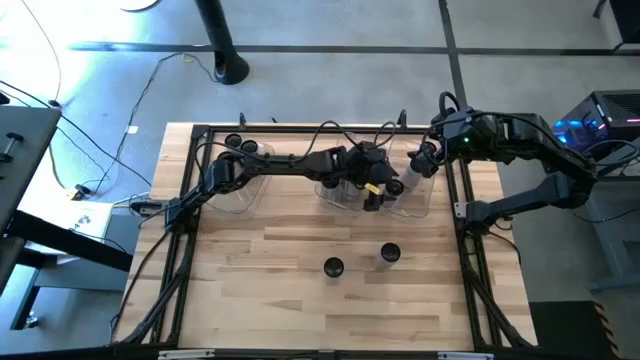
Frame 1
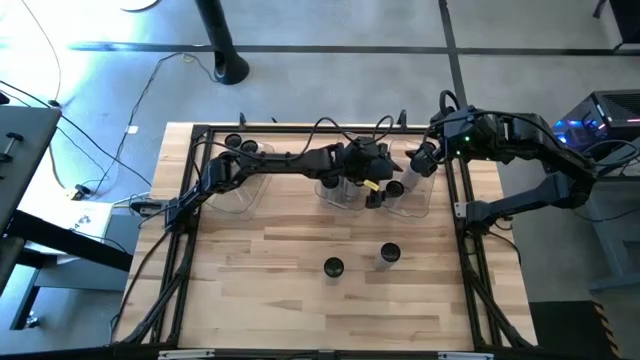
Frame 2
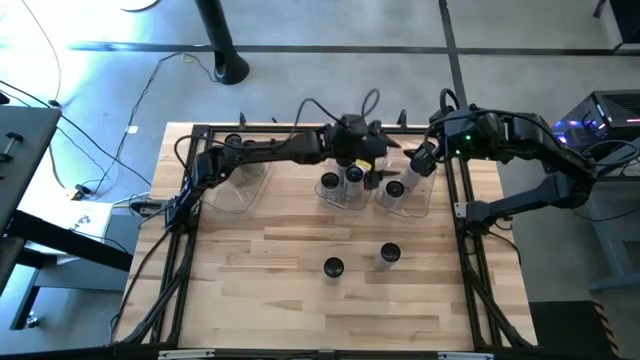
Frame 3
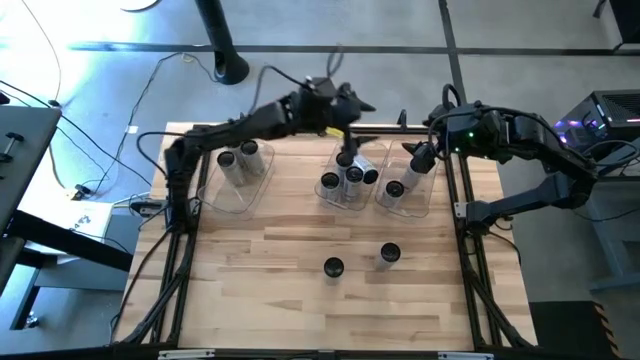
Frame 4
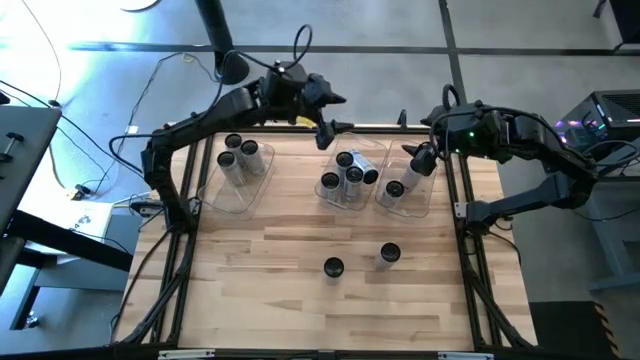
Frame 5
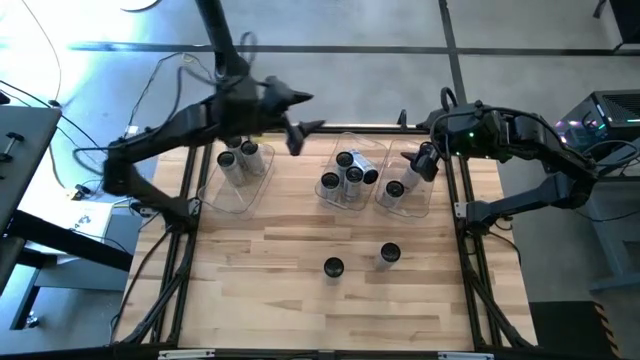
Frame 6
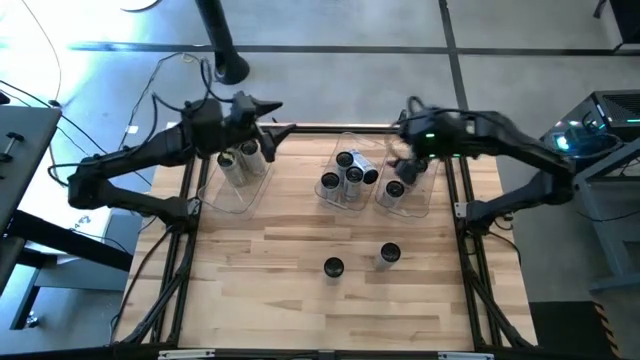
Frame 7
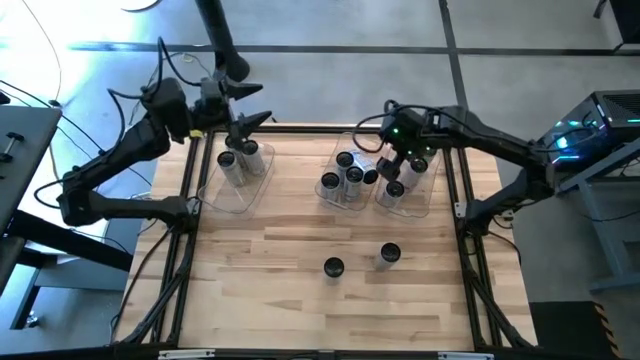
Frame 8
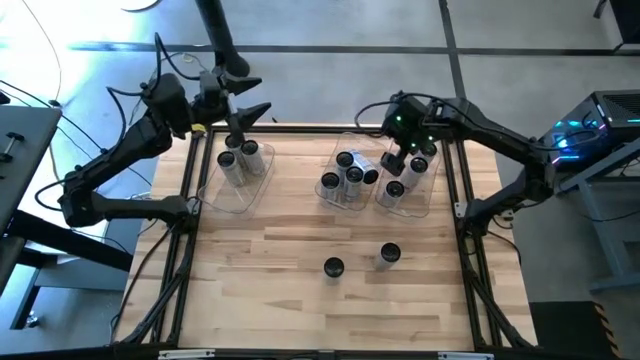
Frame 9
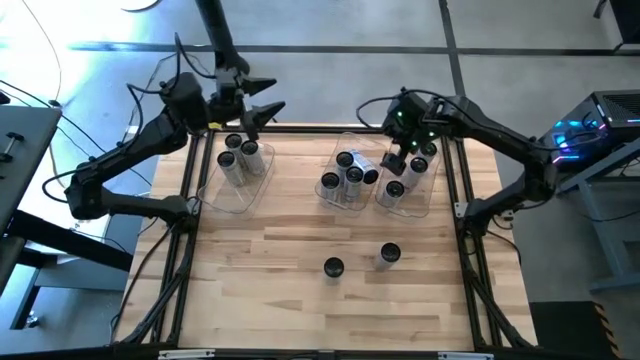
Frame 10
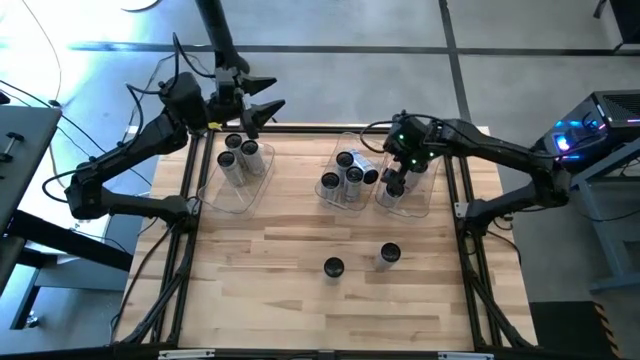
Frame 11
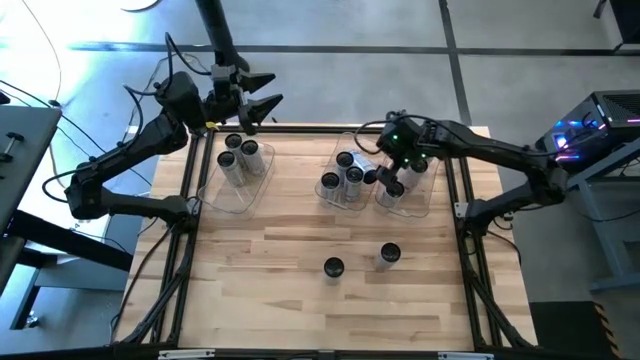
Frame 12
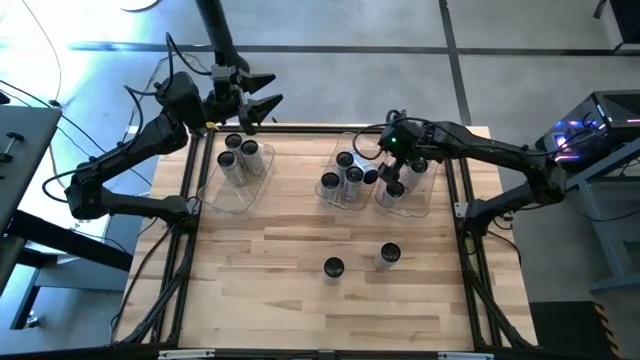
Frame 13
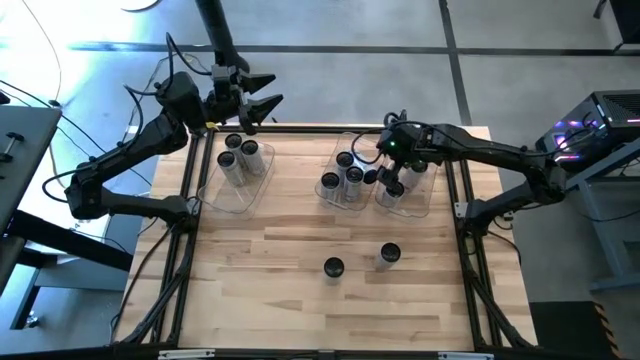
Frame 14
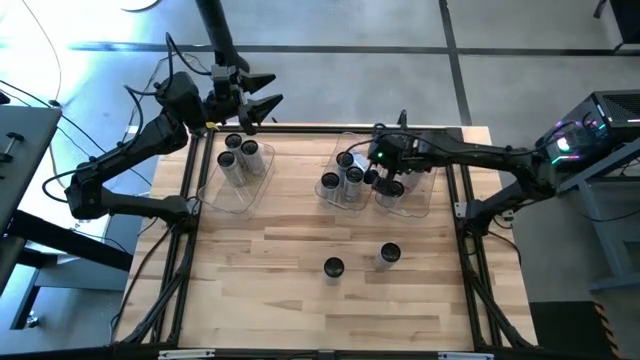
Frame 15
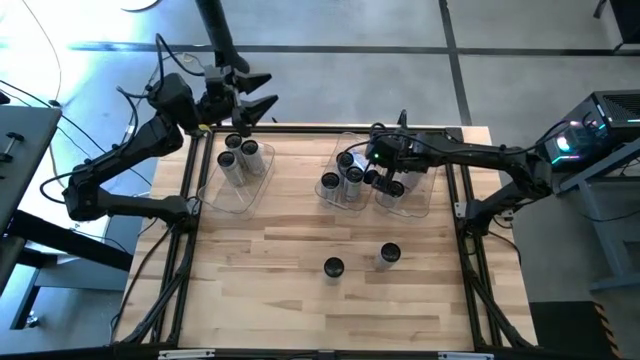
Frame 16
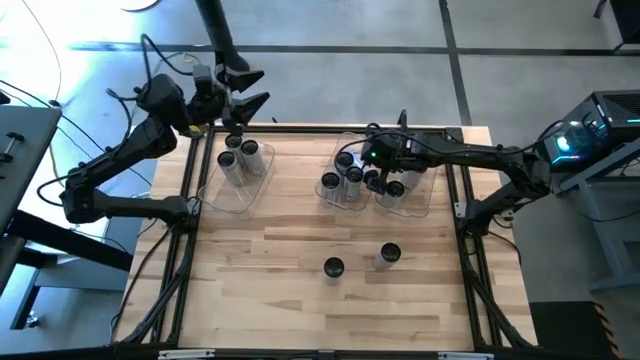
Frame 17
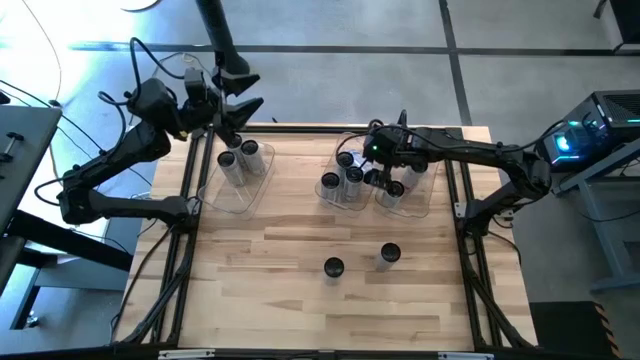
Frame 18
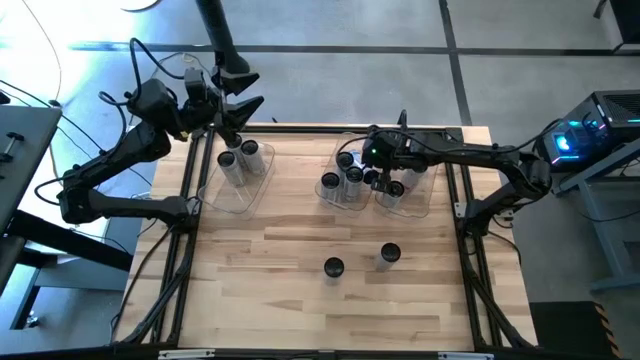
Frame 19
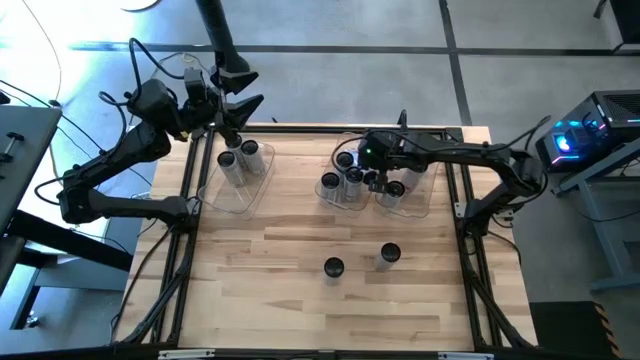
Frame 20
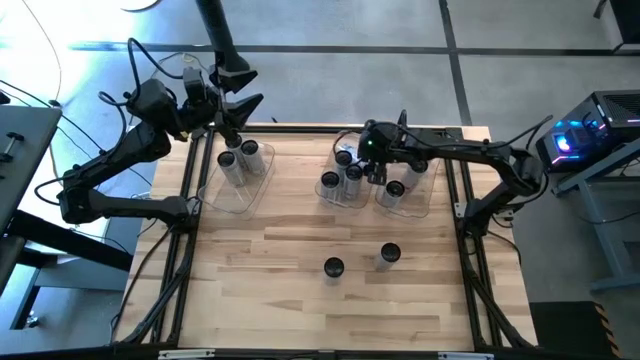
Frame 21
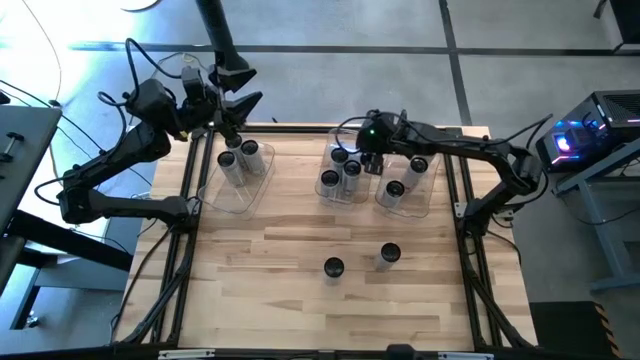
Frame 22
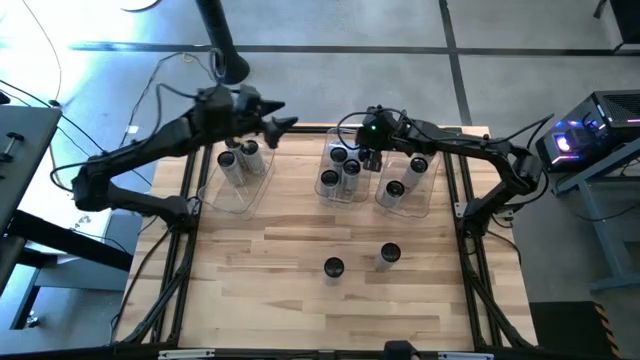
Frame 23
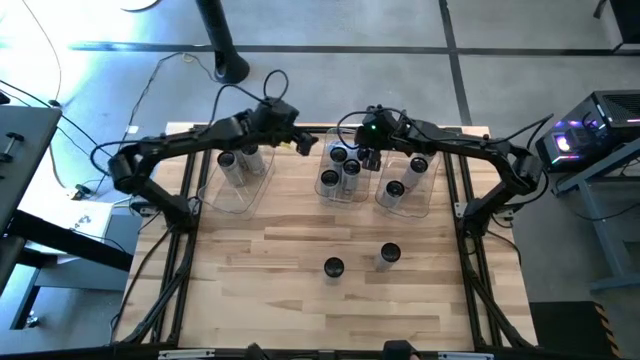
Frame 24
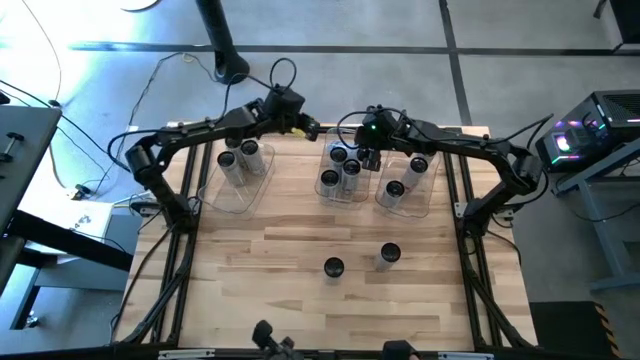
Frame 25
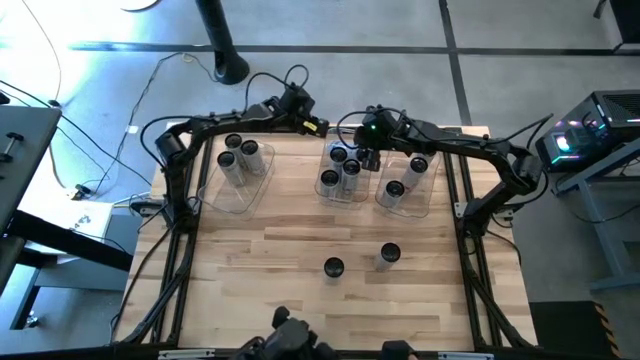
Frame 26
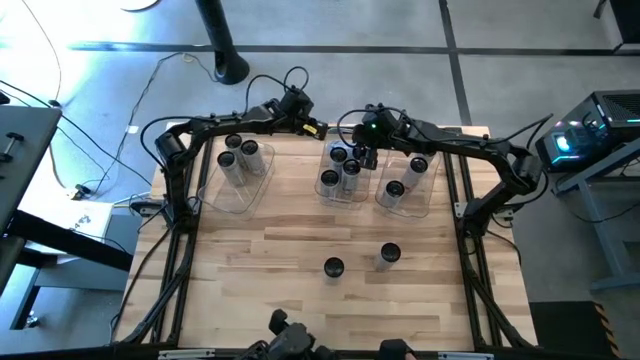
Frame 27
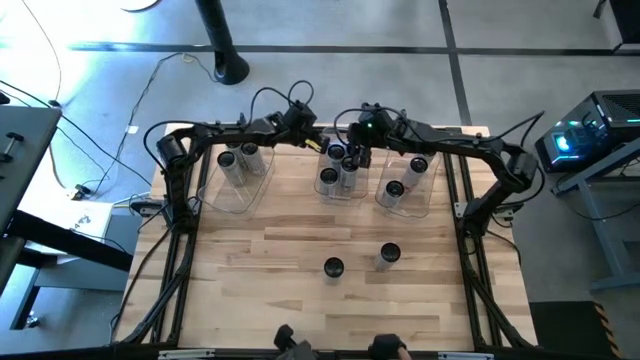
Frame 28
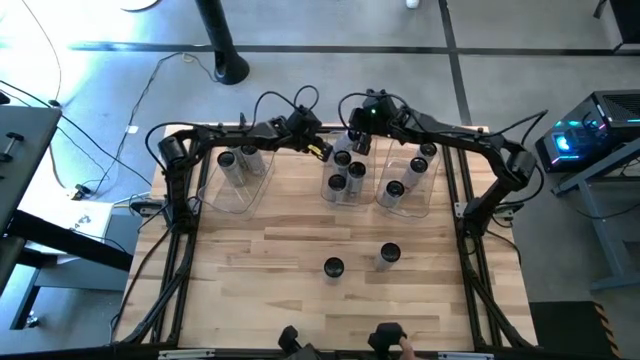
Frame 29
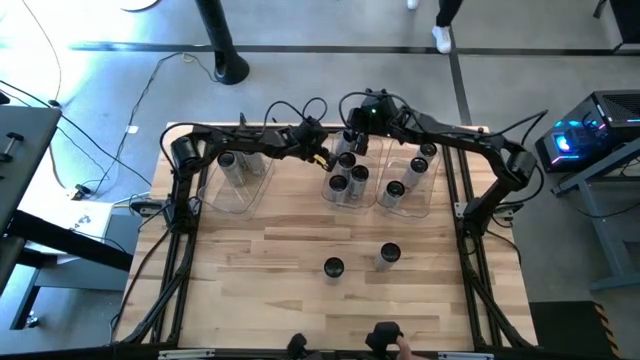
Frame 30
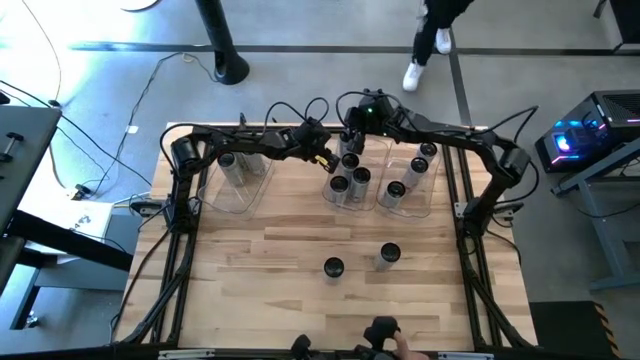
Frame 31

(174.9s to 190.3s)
Task: Sort soda cans
Adjust the white-blue soda can in the top center transparent bin

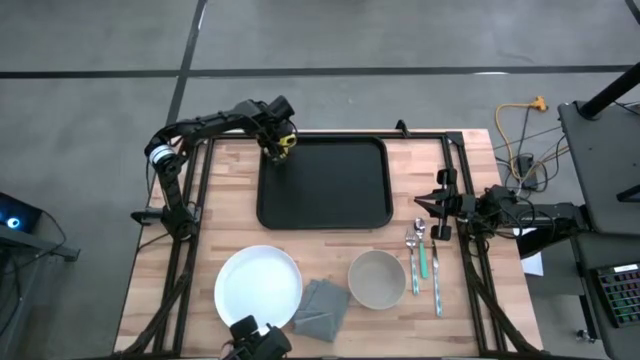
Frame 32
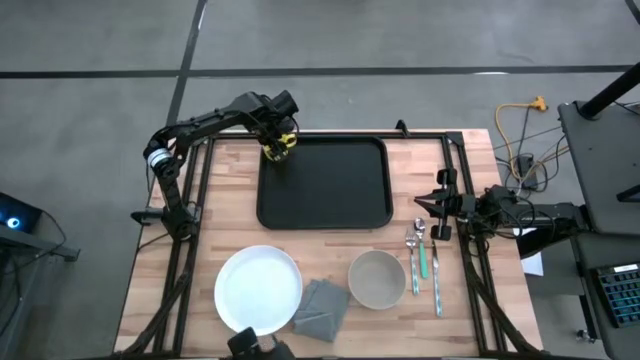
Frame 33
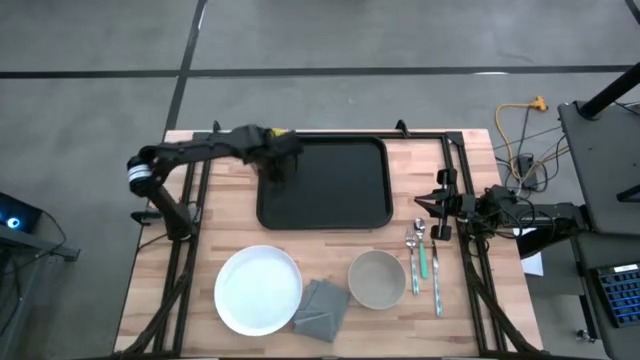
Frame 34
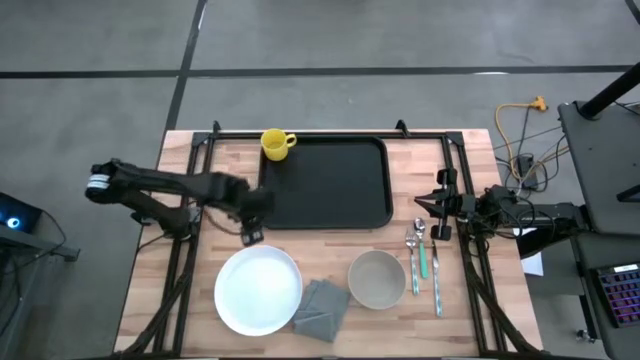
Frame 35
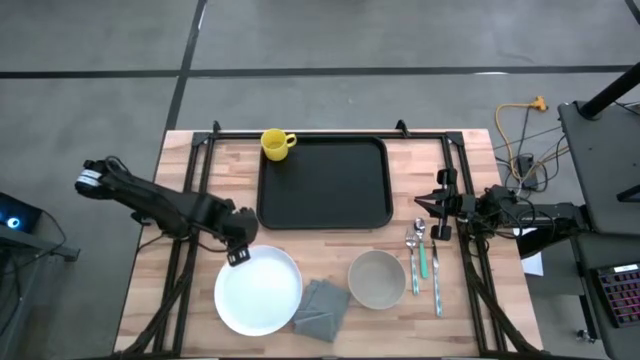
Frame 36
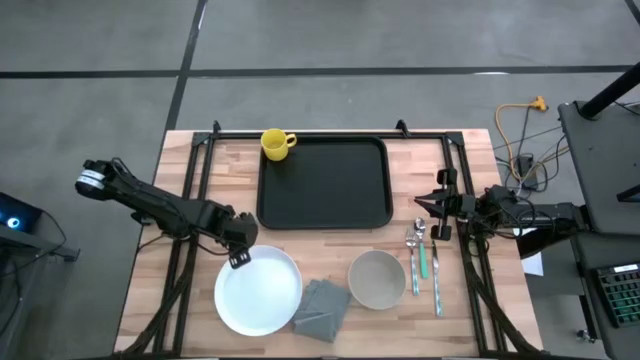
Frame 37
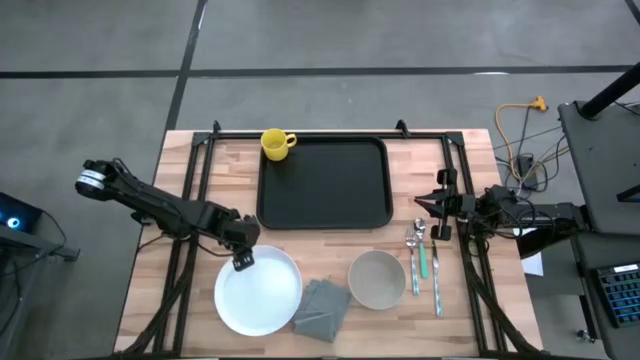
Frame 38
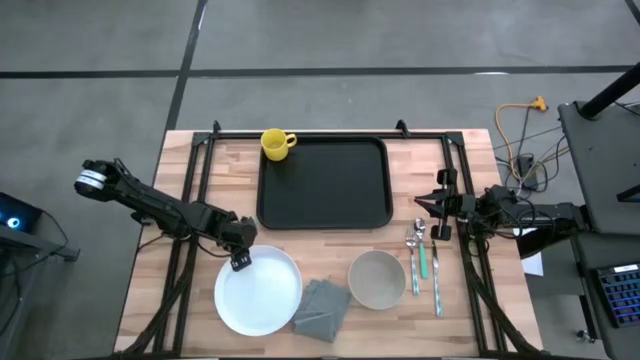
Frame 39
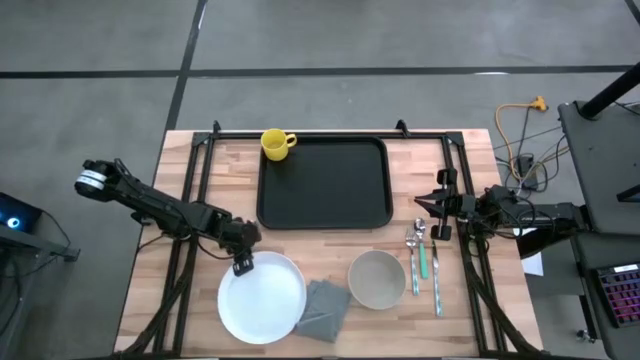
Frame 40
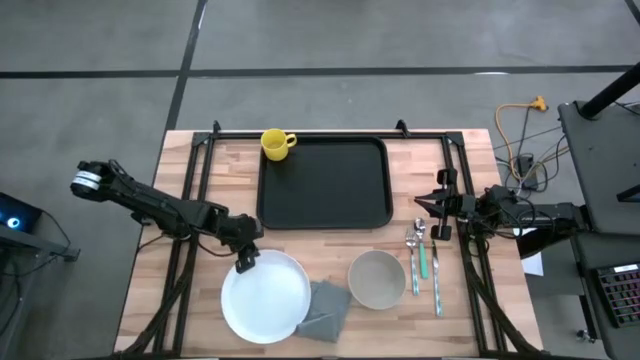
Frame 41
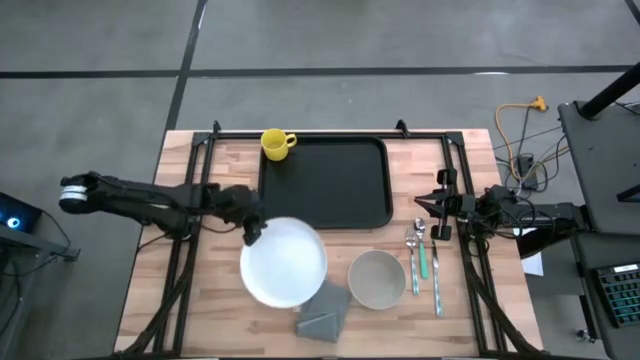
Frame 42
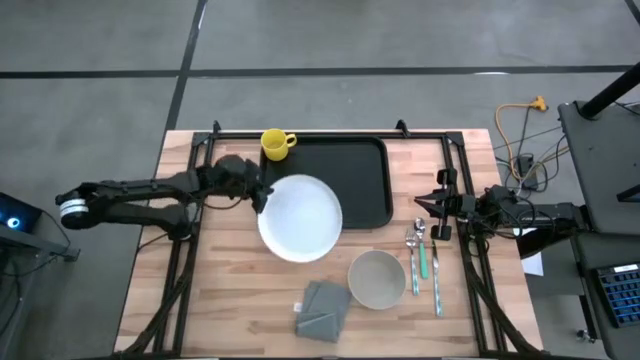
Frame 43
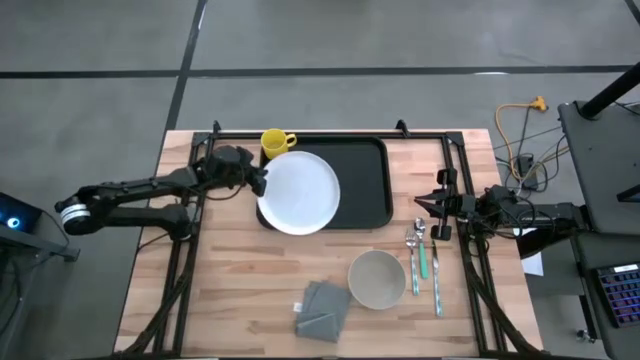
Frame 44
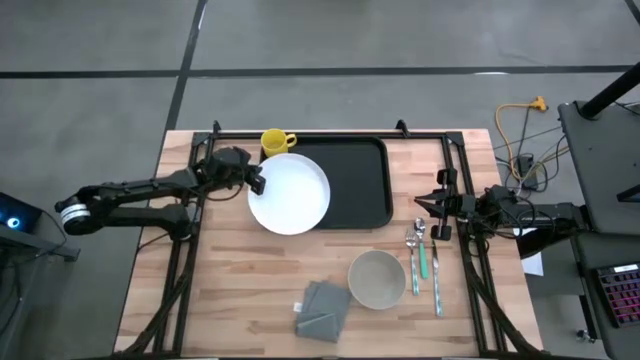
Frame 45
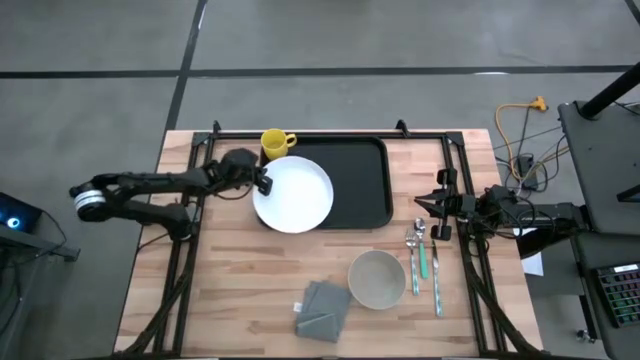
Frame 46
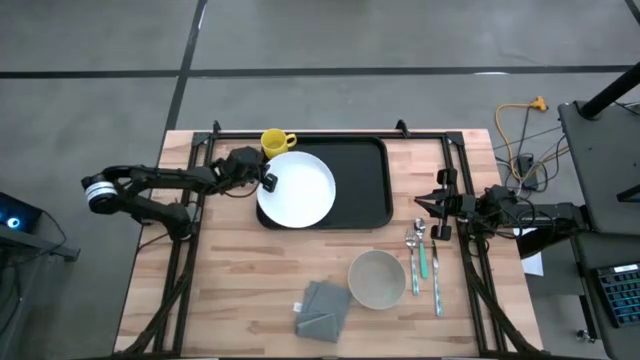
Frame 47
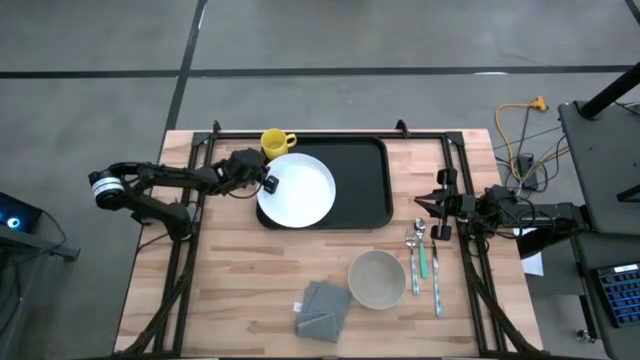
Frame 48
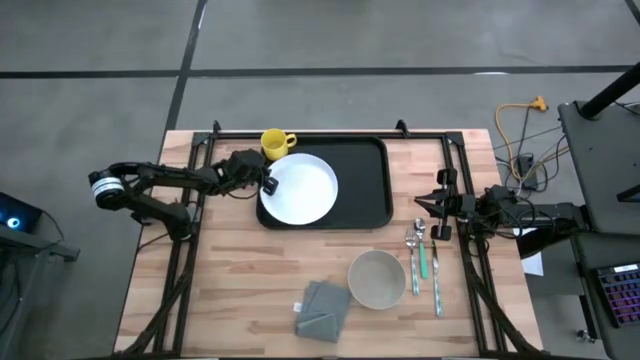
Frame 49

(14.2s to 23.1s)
Task: Set up tray
Put the white plate on the black serving tray
